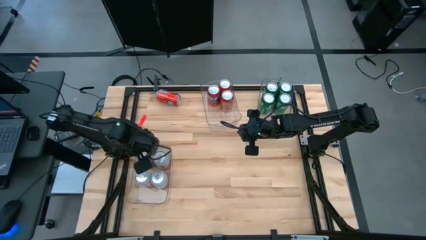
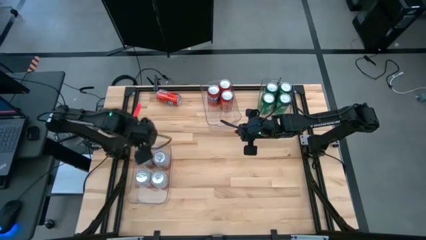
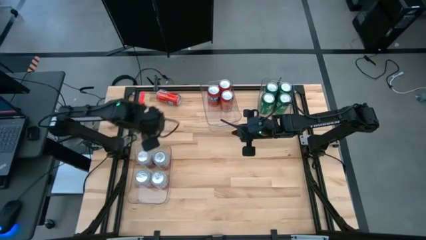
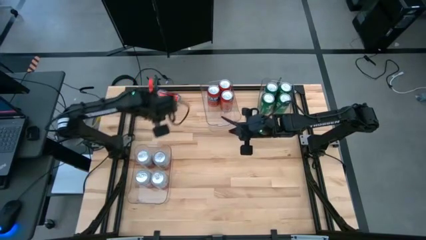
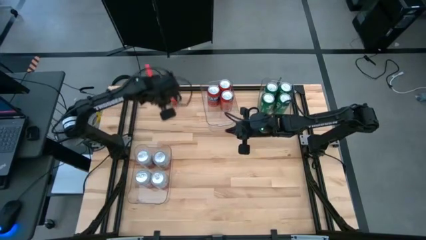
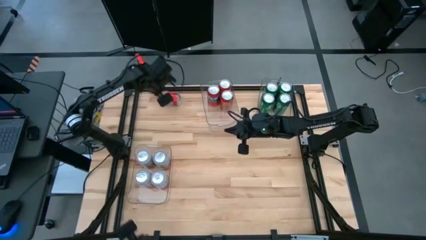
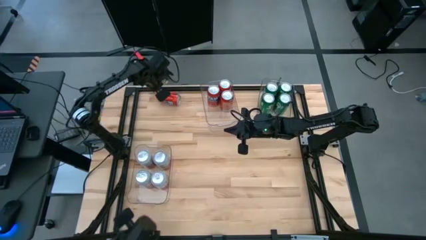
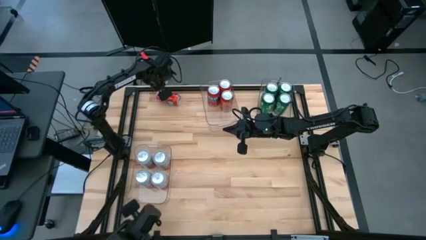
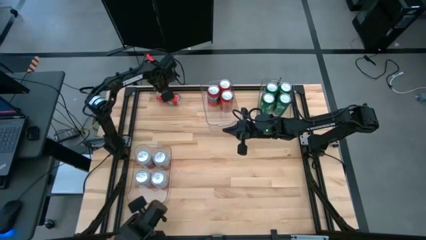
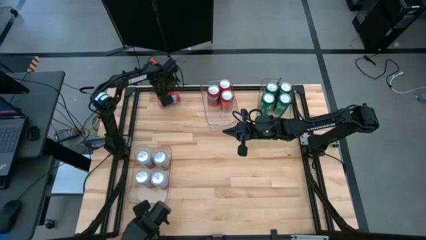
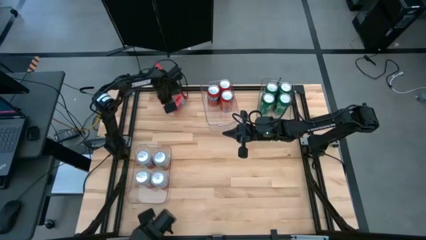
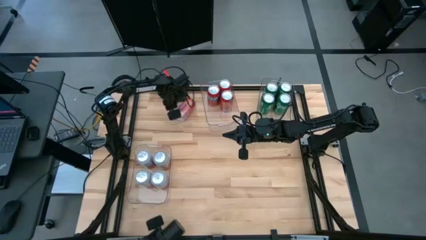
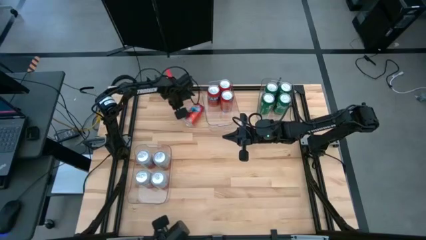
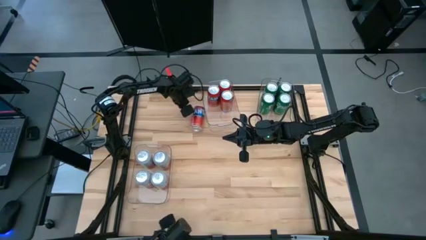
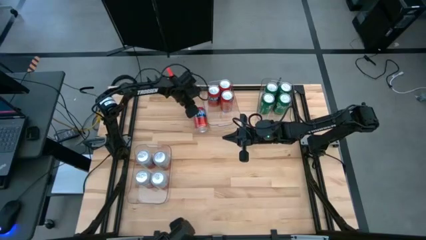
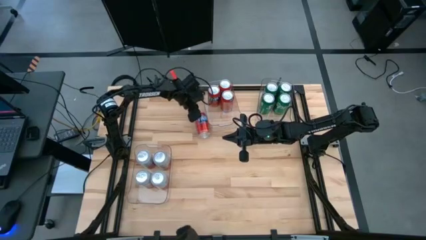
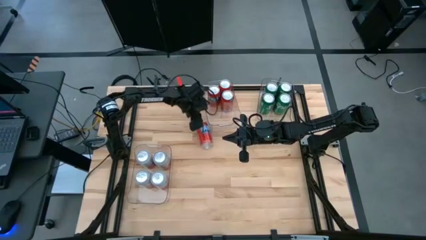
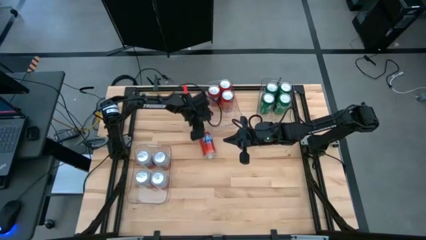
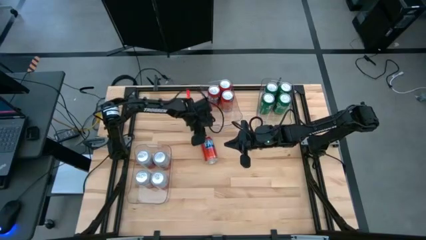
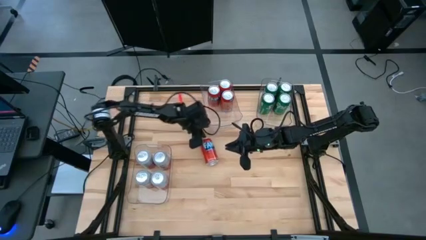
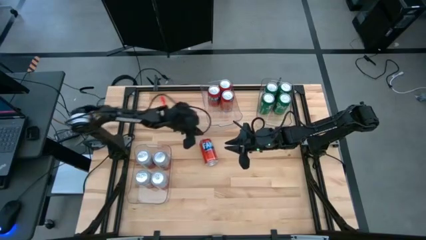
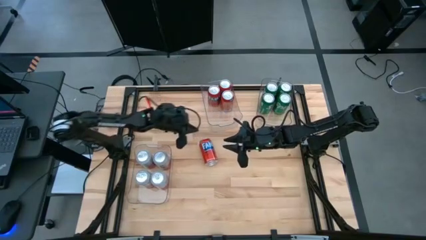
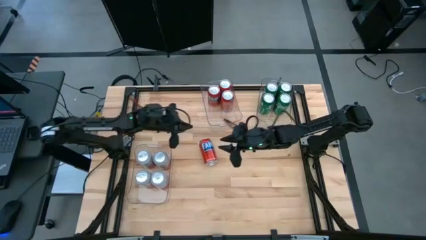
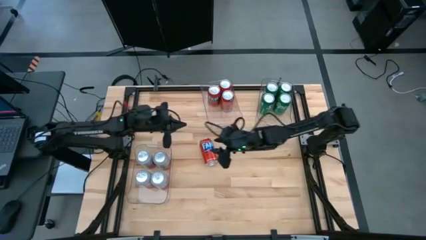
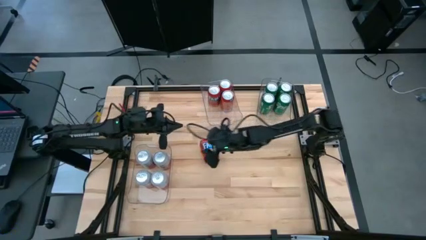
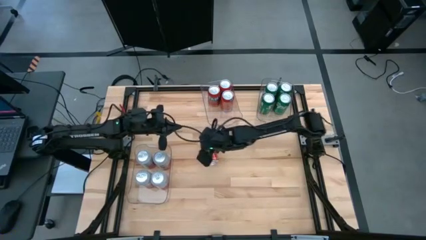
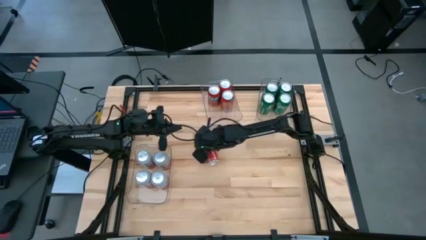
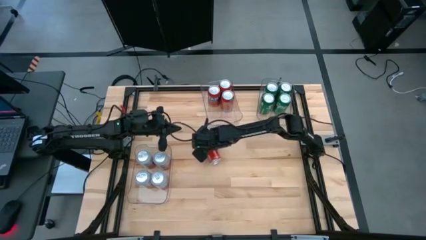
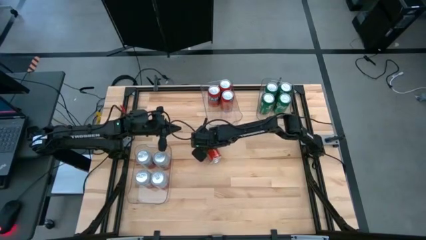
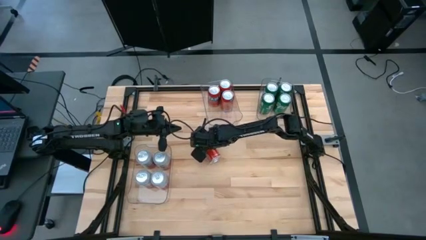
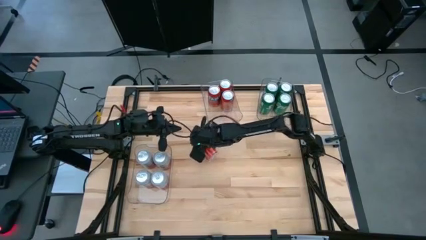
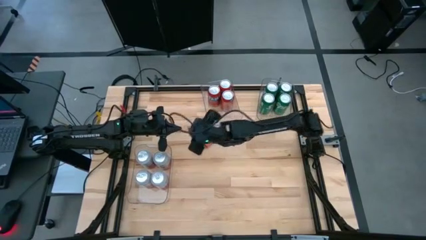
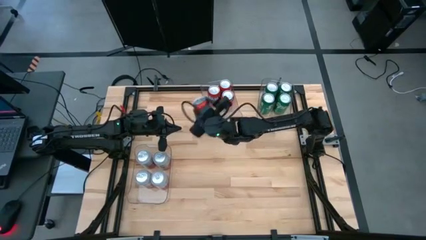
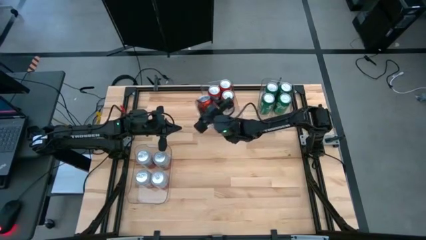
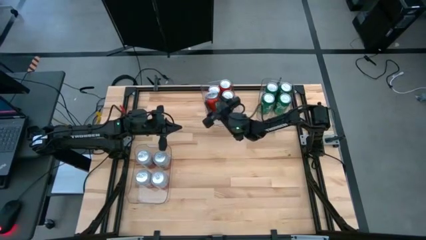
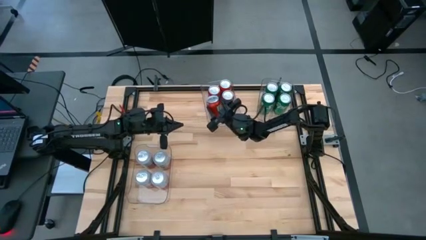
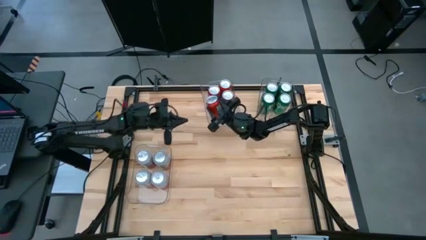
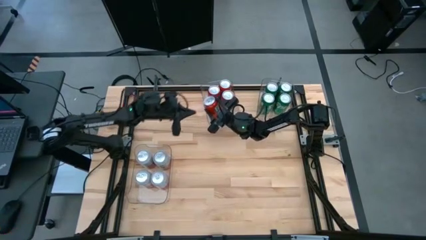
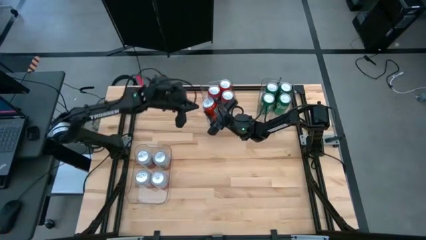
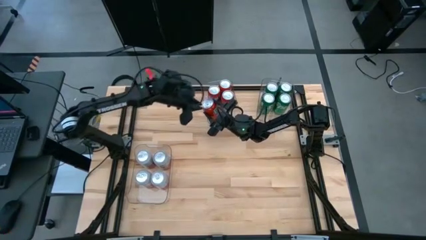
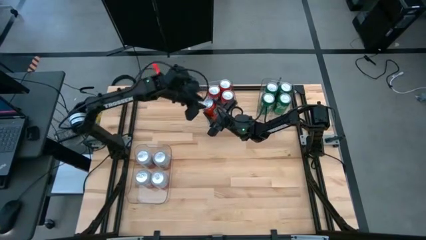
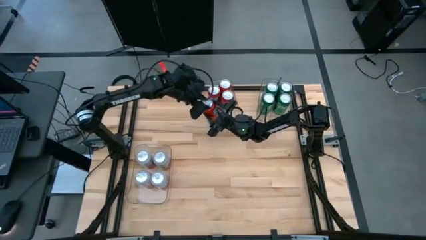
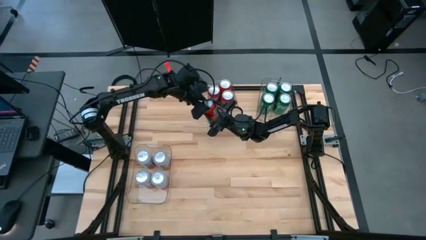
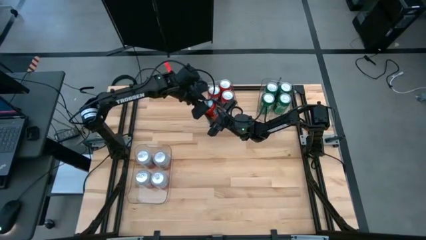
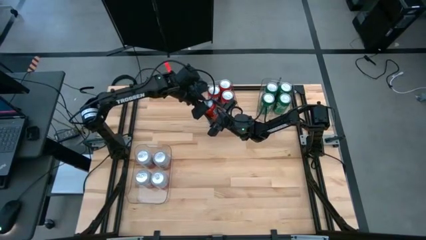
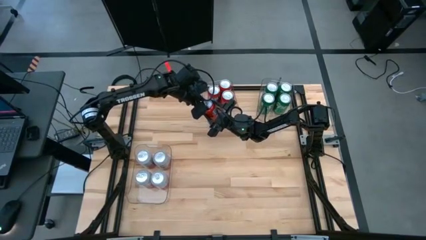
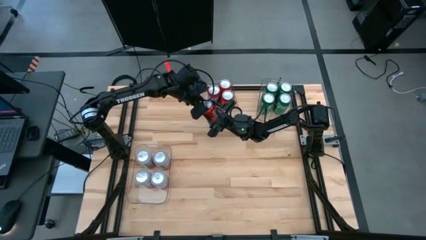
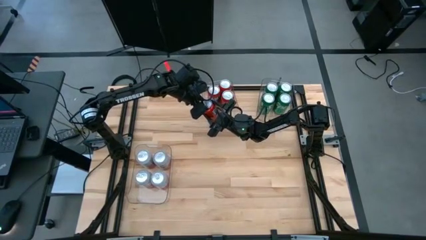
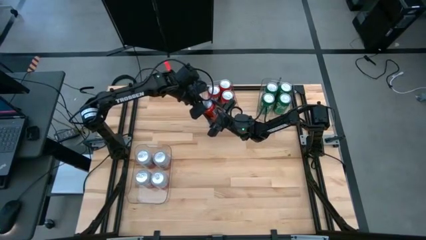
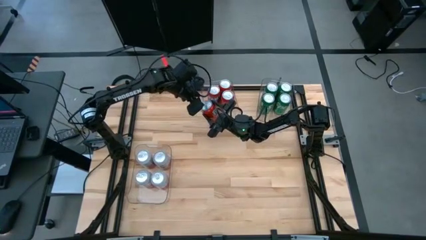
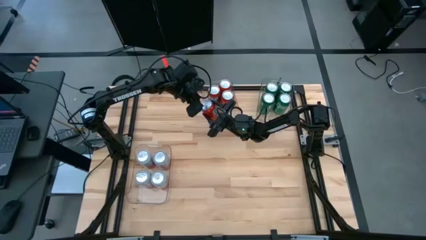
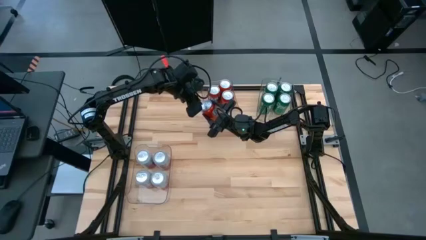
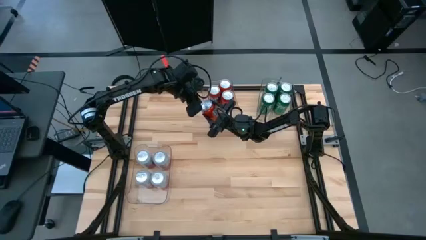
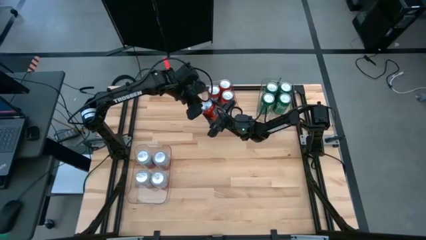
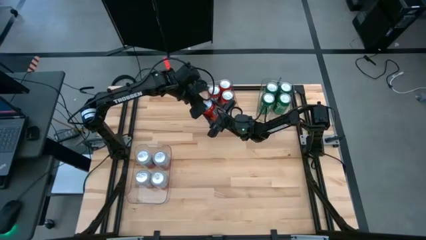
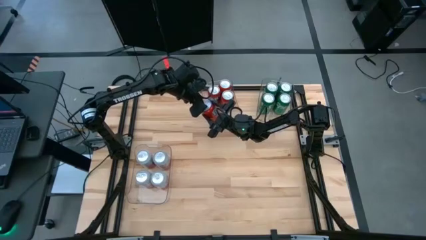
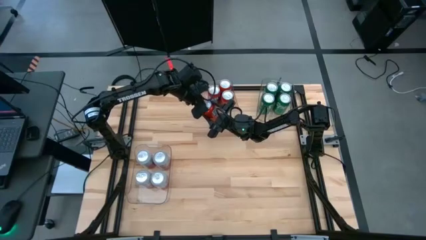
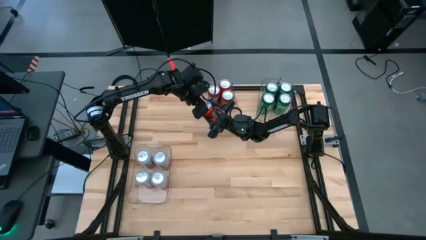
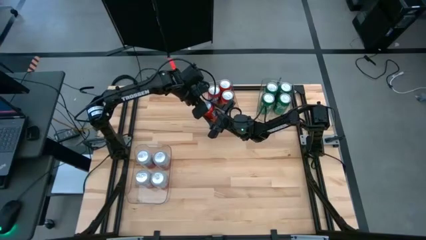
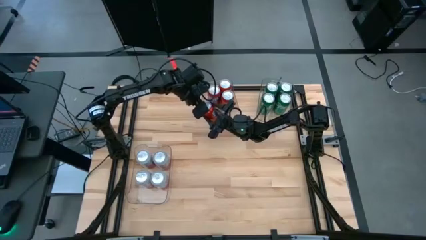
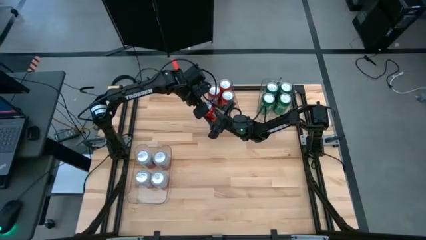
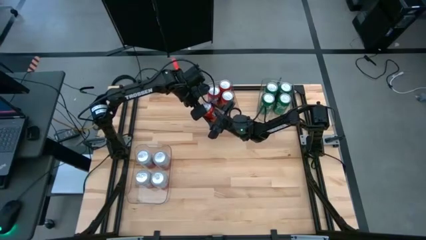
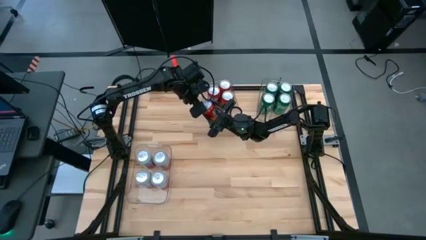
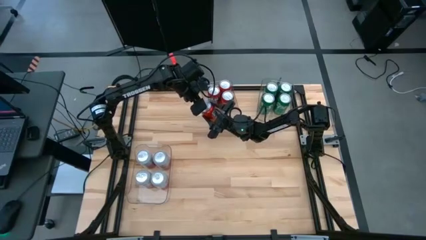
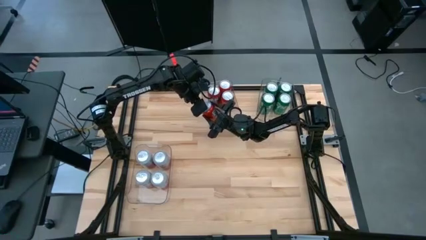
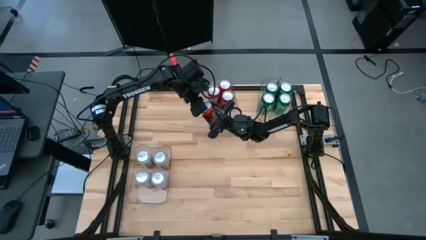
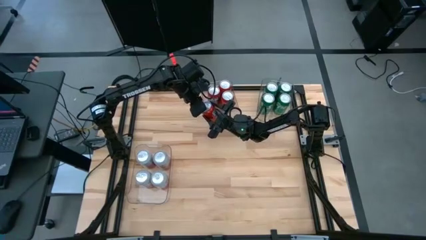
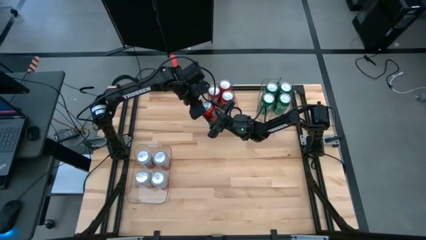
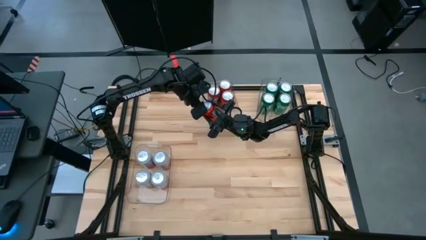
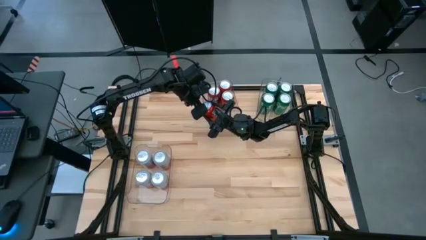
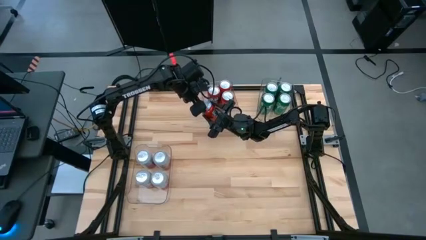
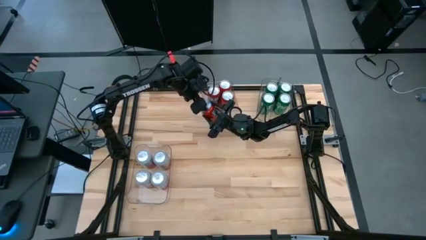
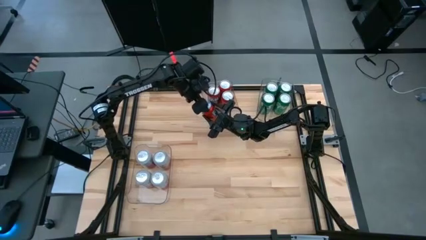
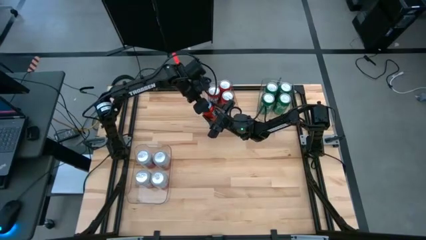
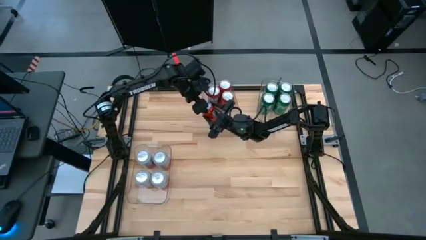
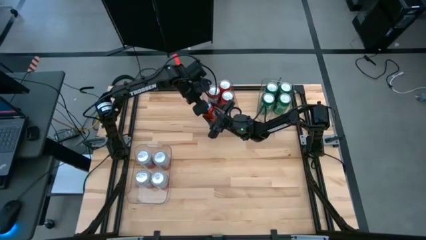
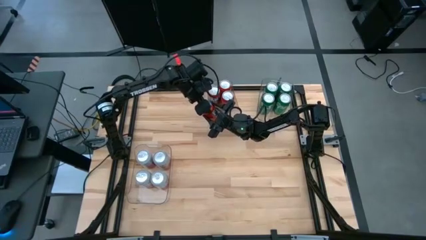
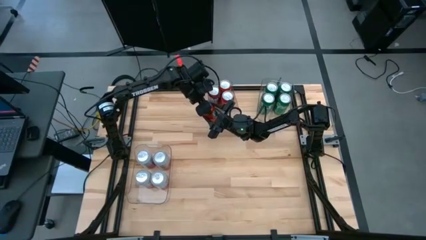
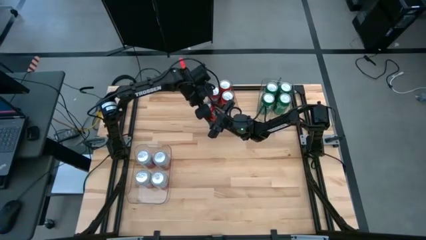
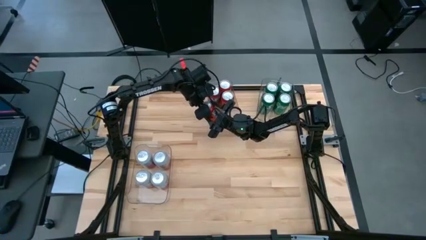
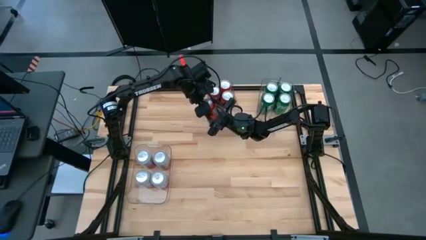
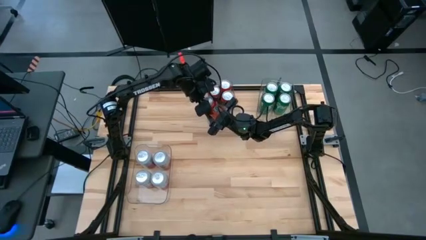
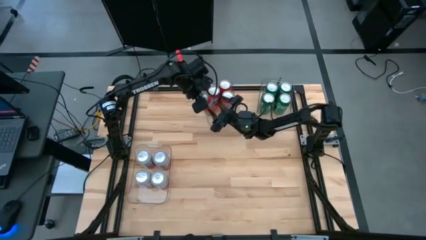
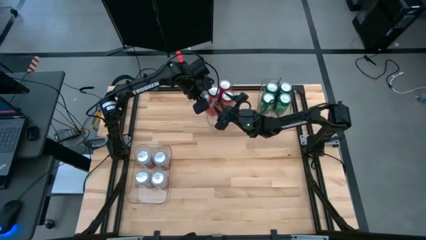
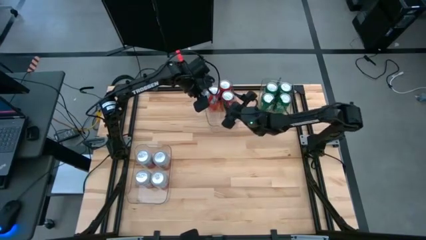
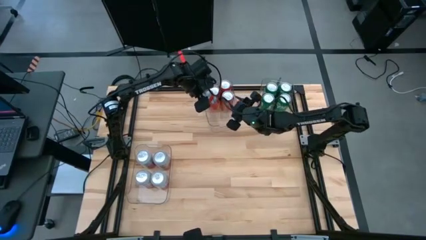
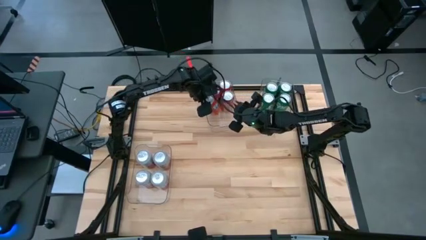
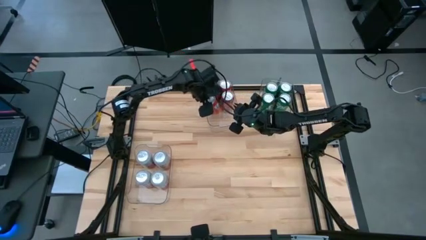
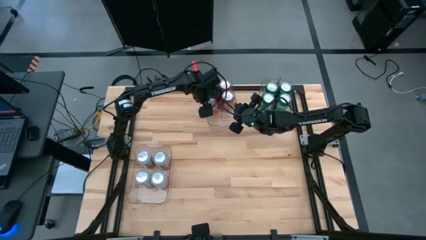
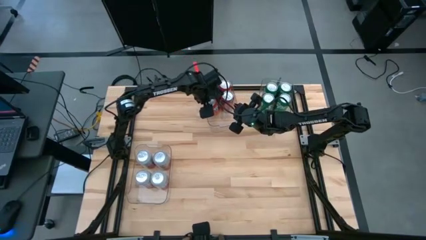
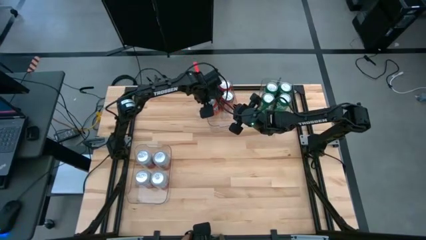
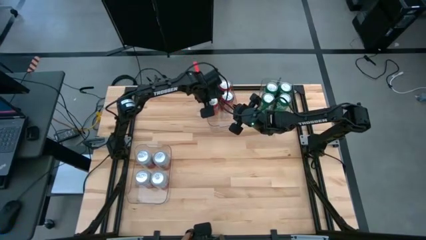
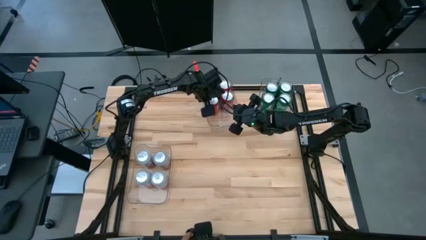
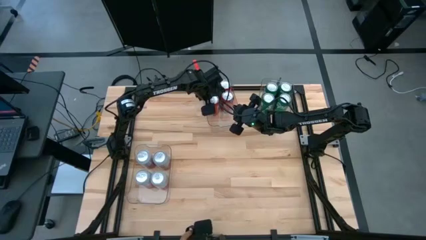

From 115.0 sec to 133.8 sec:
Task: Sort soda cans
Put the orange soda can into the top left transparent bin
